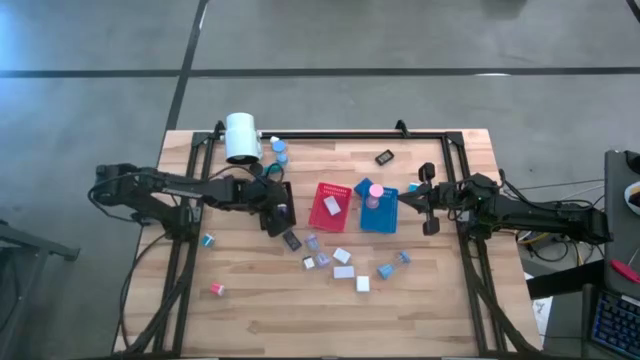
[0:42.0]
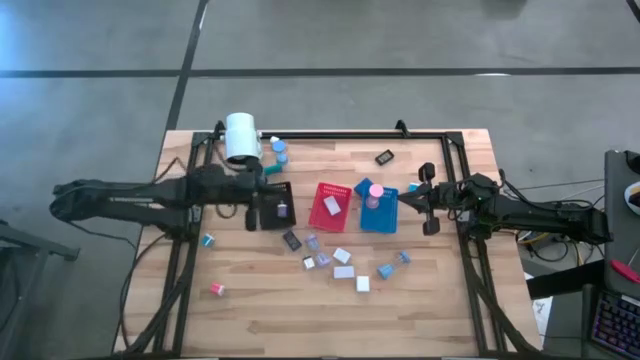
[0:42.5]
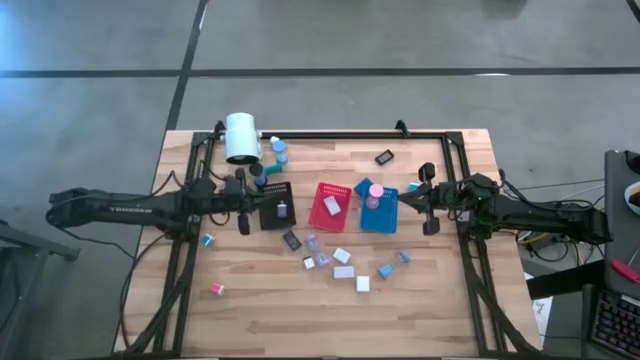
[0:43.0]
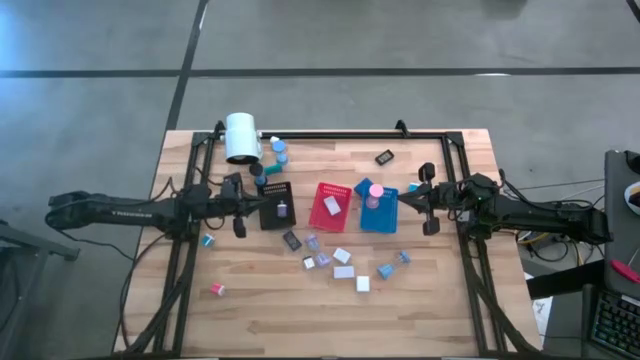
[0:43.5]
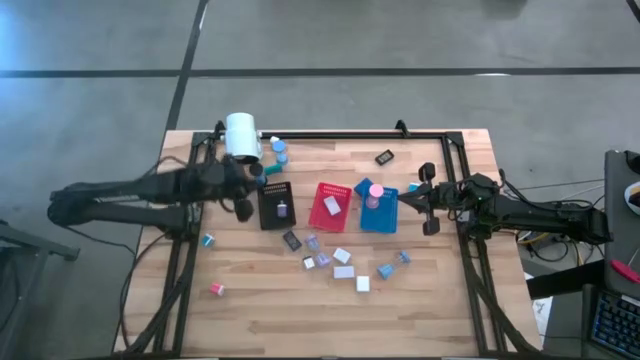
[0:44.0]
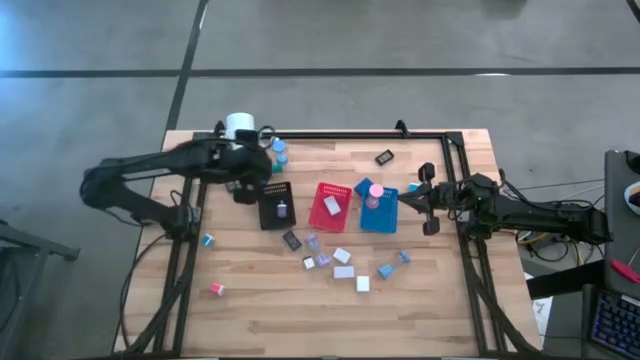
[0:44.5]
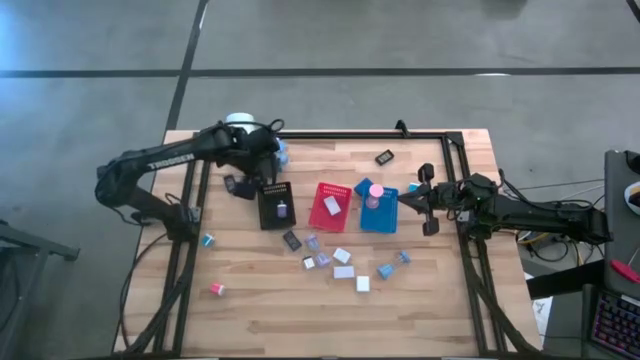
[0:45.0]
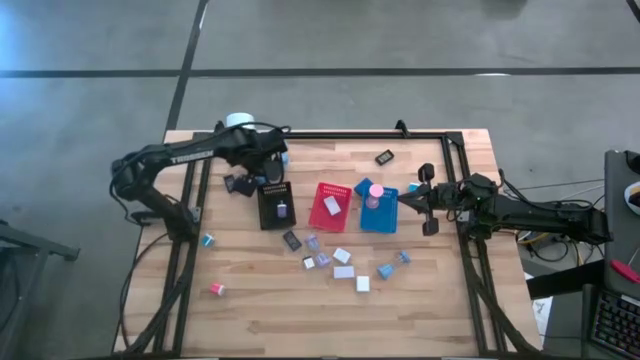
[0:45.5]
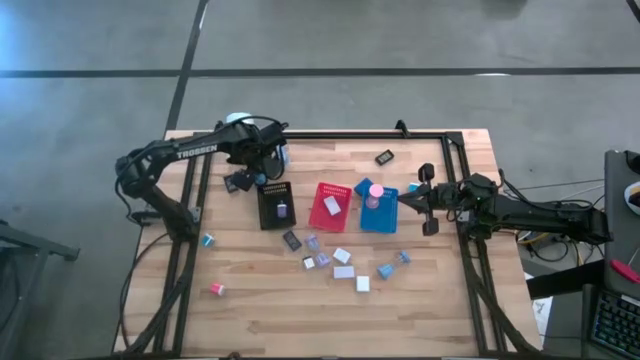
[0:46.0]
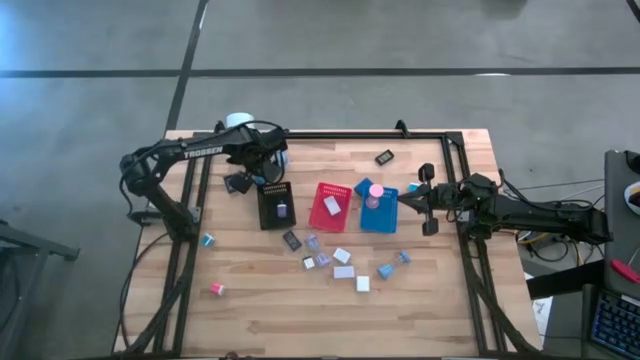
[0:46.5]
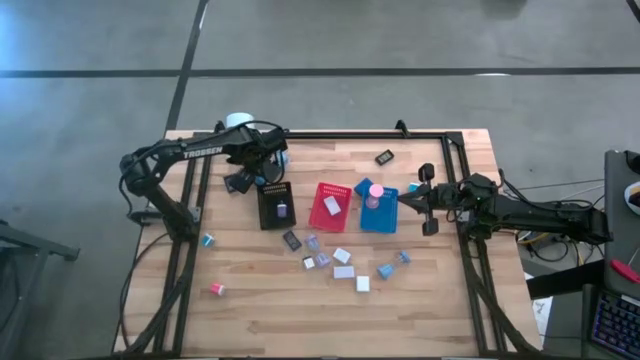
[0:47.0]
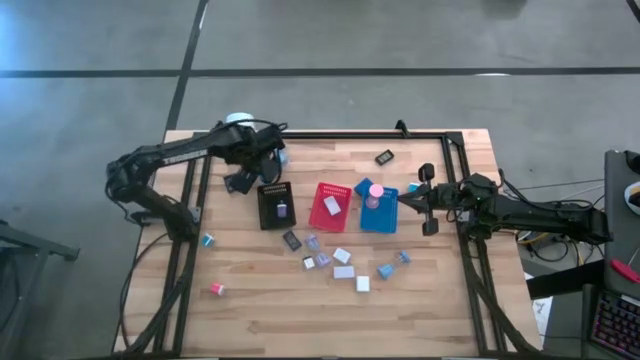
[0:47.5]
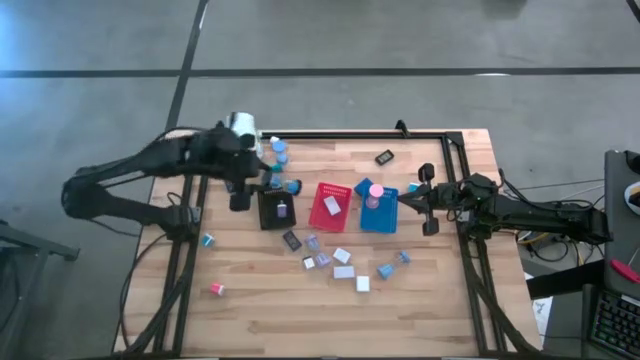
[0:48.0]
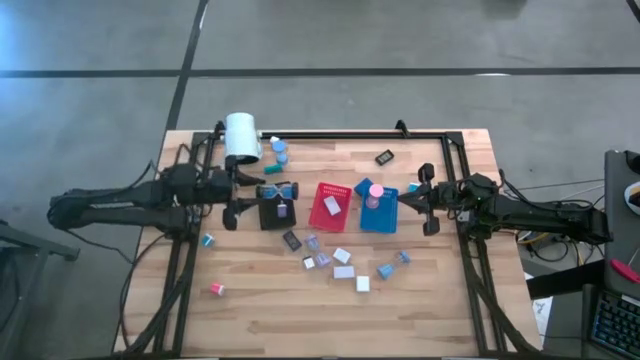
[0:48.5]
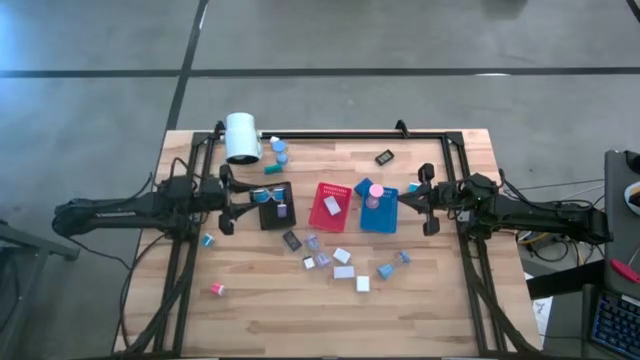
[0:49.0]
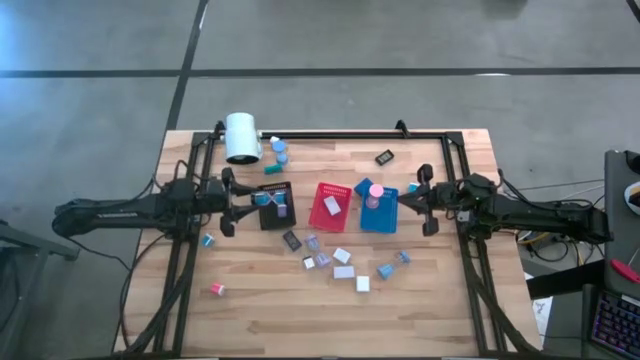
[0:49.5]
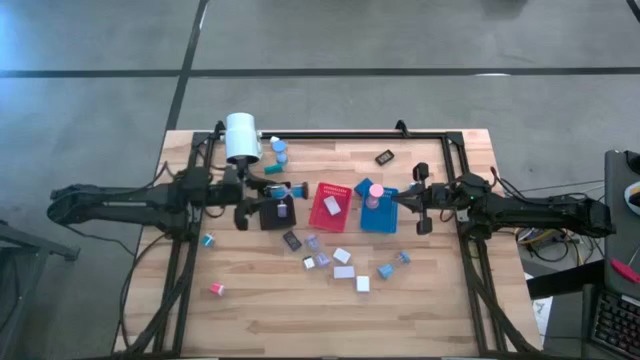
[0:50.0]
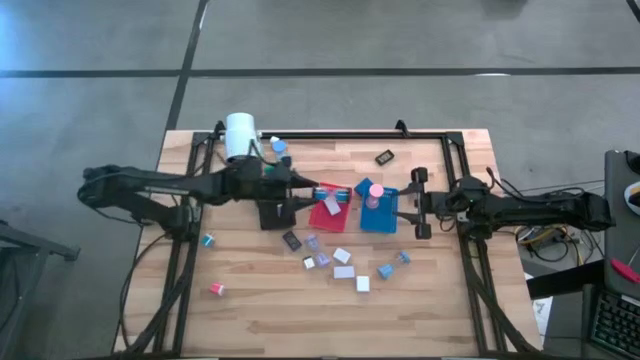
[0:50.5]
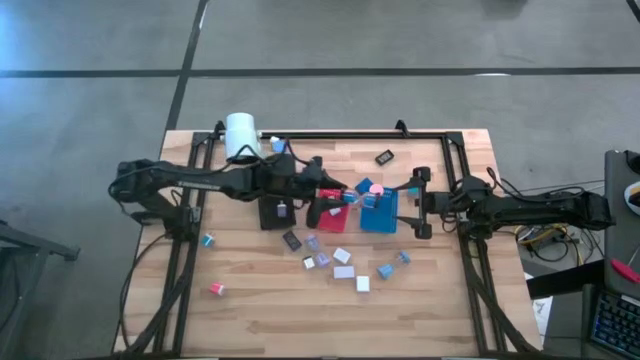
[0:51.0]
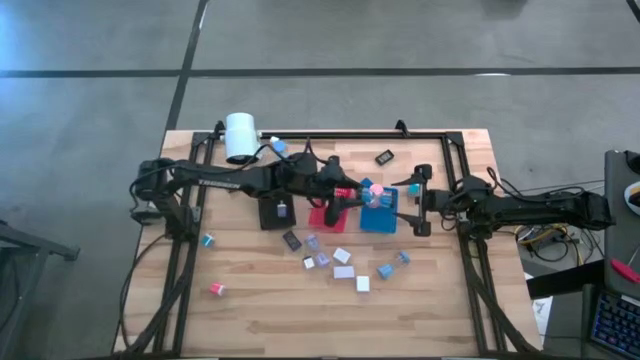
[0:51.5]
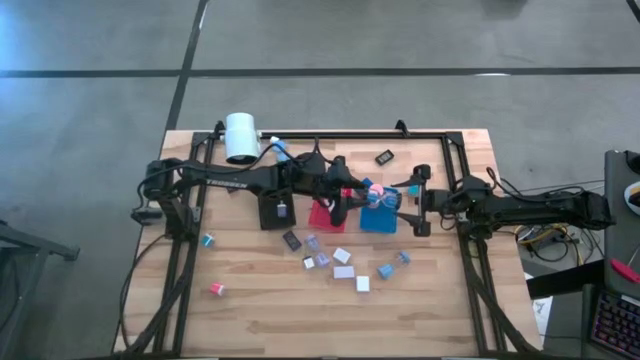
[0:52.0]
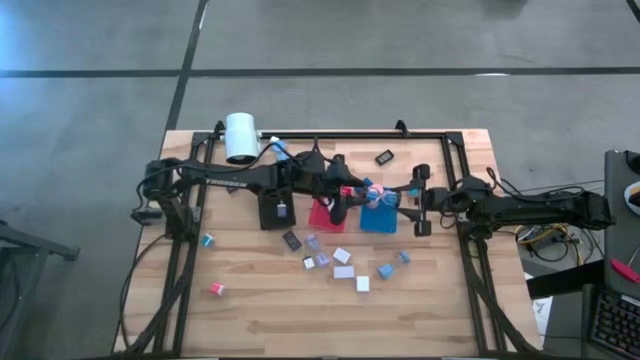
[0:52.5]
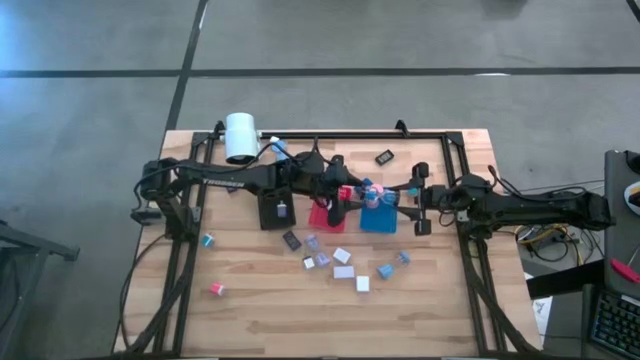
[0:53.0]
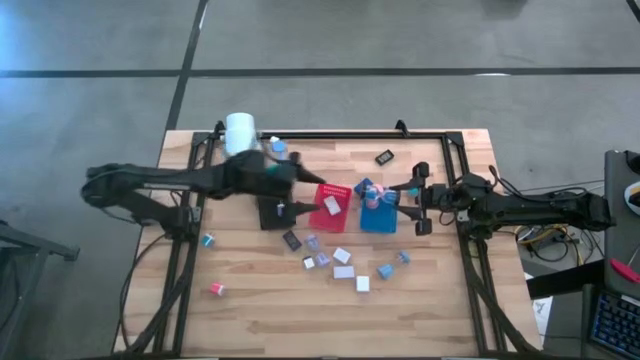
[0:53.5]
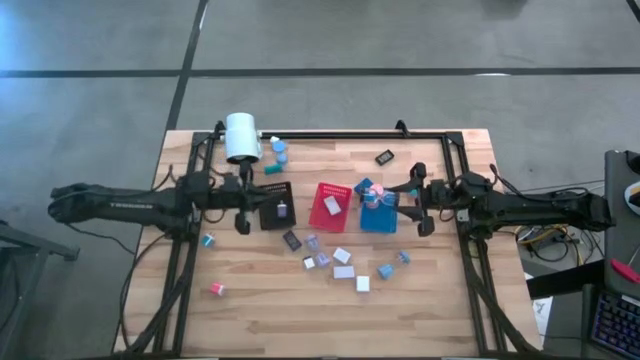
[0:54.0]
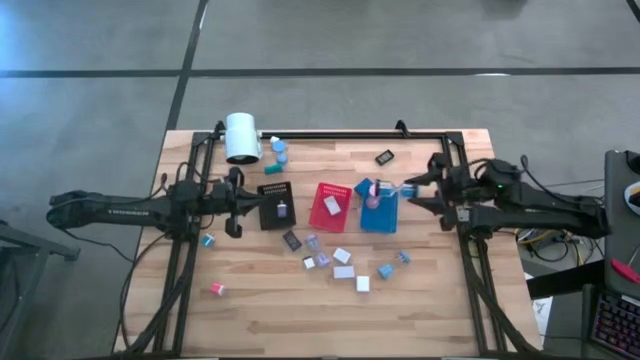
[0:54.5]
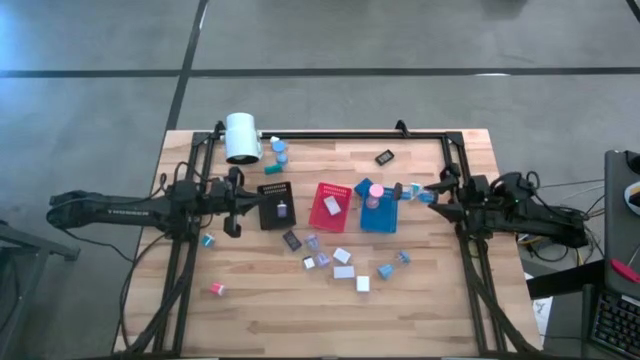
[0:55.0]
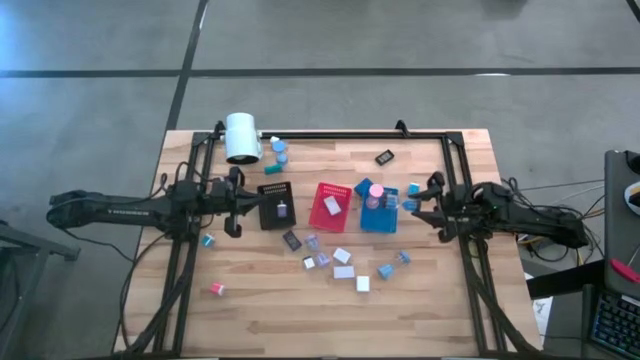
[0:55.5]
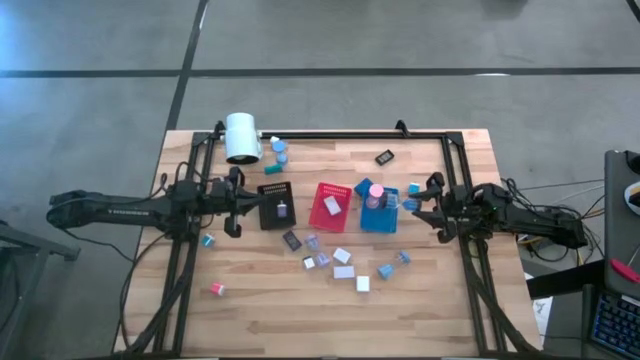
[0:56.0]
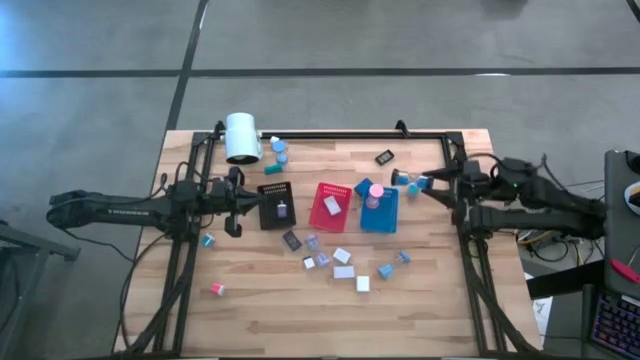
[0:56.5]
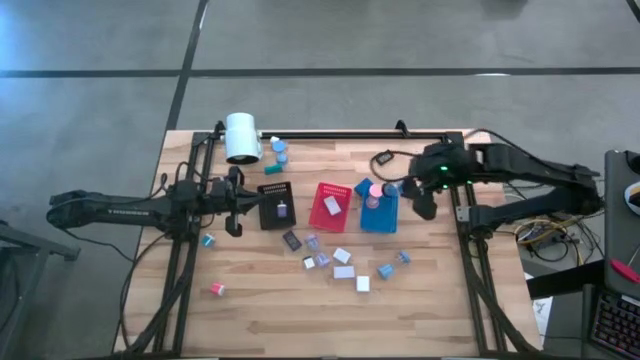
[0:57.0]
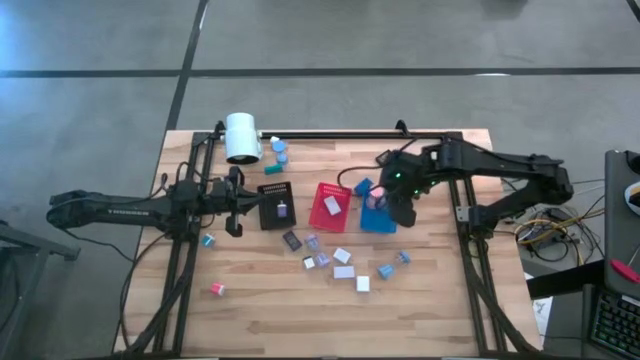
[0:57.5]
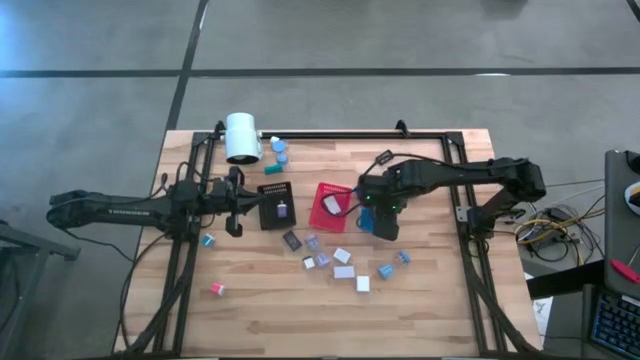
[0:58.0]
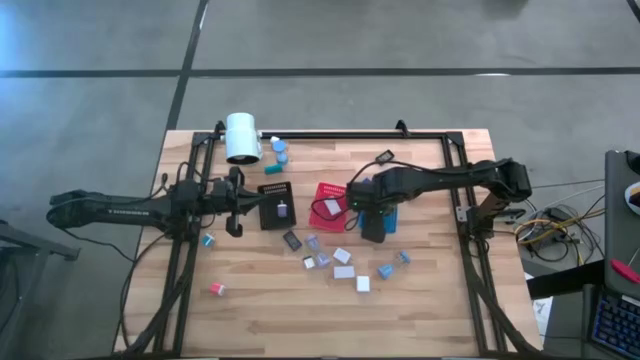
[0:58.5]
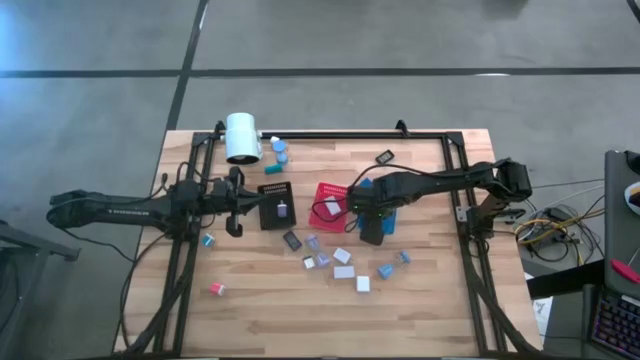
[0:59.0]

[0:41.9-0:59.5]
Task: Pick & Place Office items
Put the black hourglass into the blue bin
